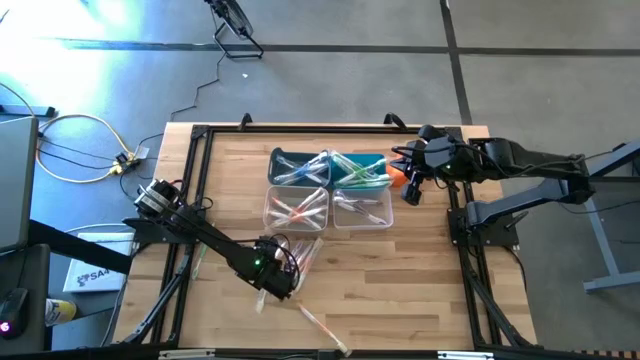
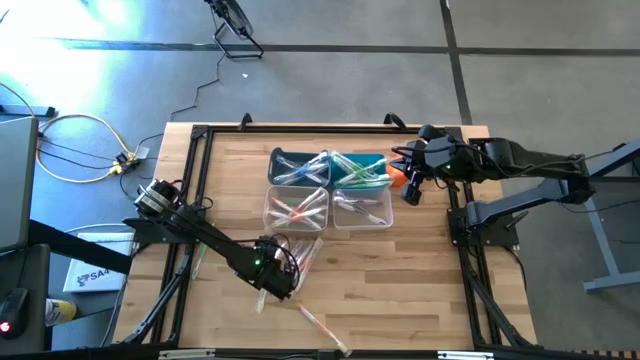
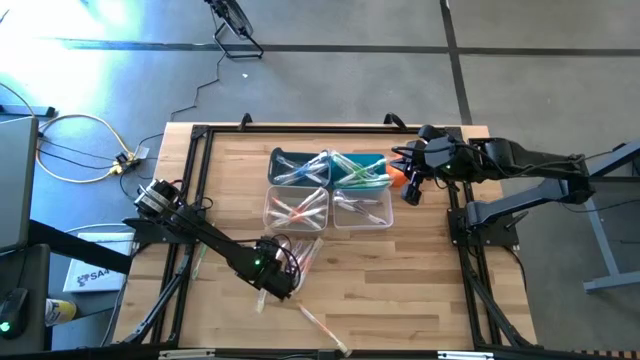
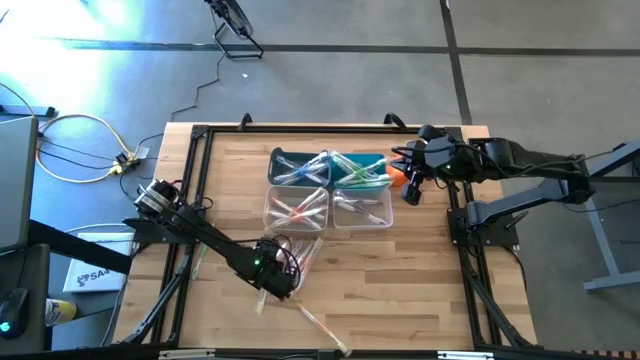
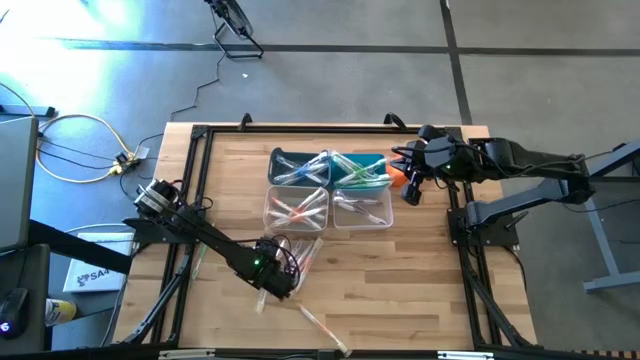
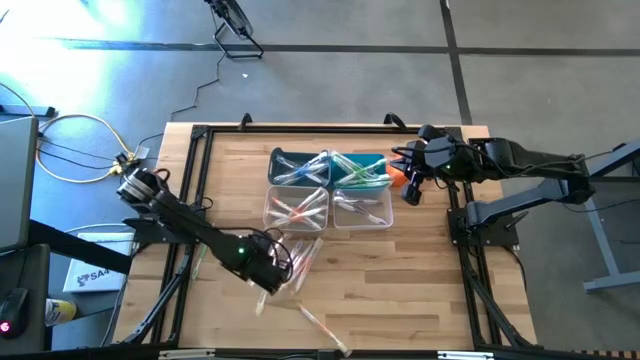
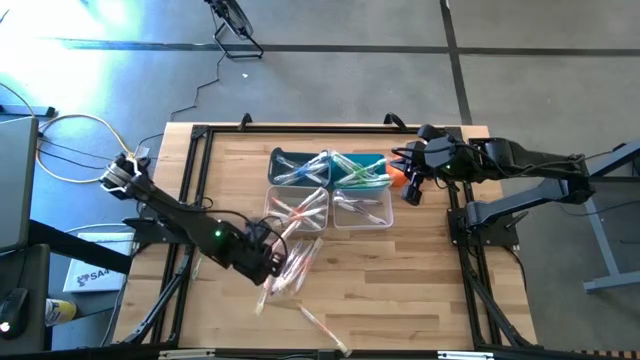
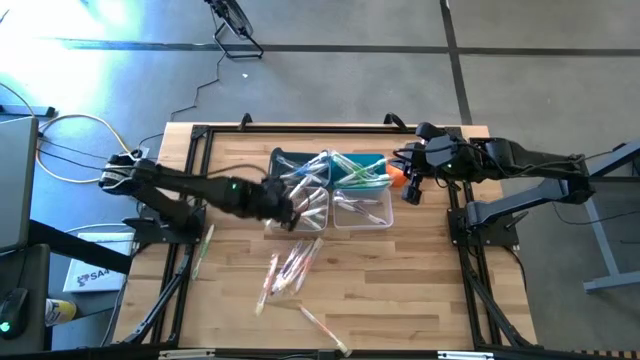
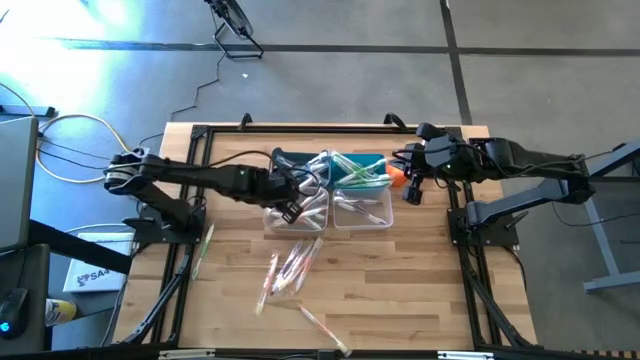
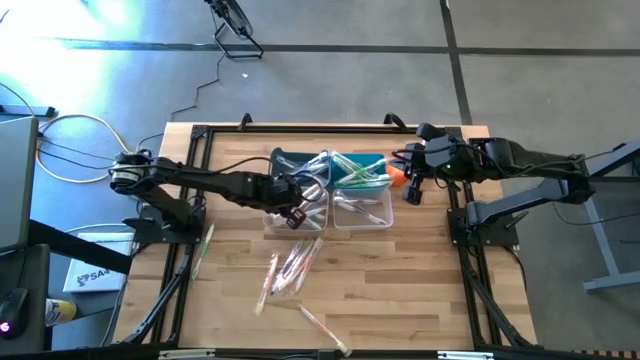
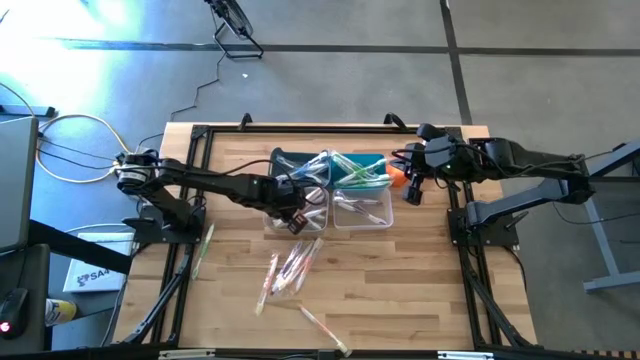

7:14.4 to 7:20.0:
Task: Pick & Place Toothbrushes
Put the orange toothbrush into the gray bin

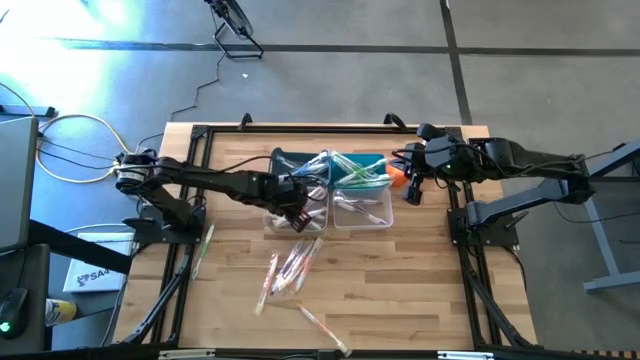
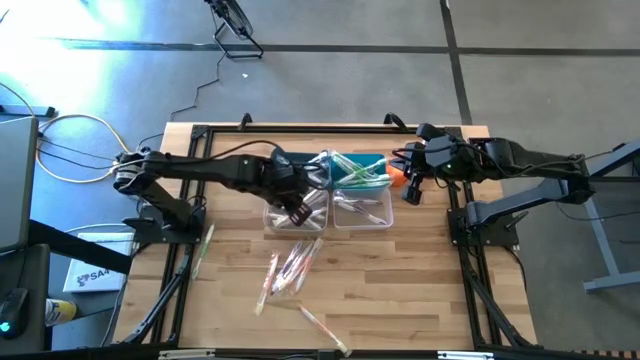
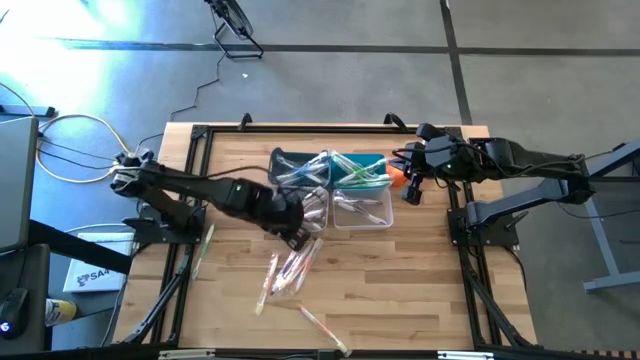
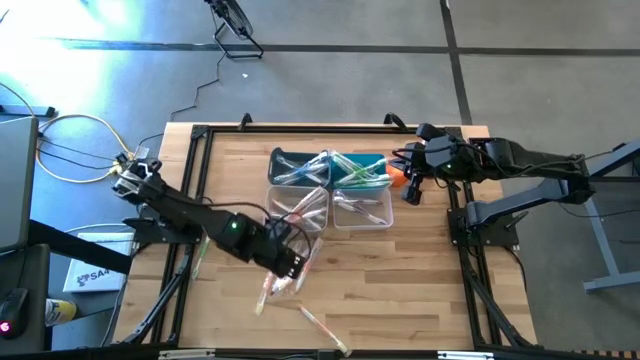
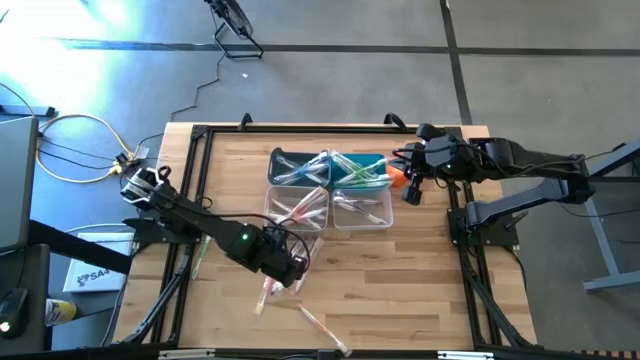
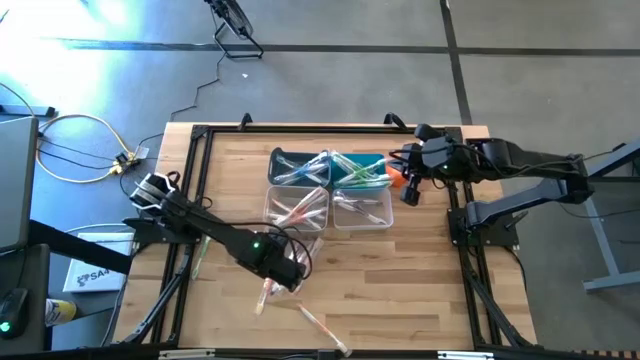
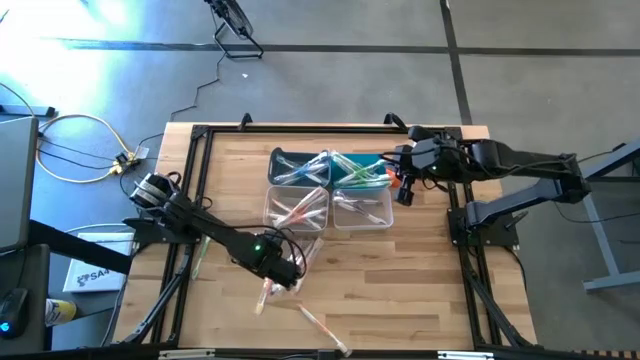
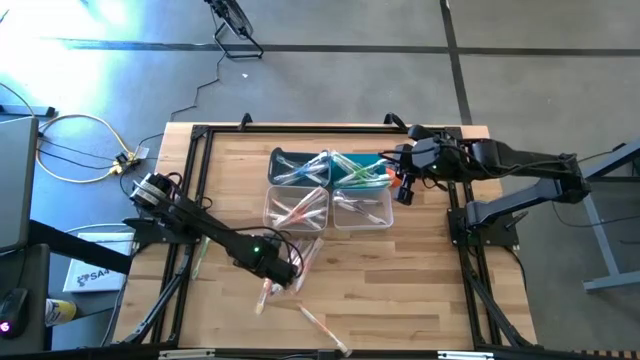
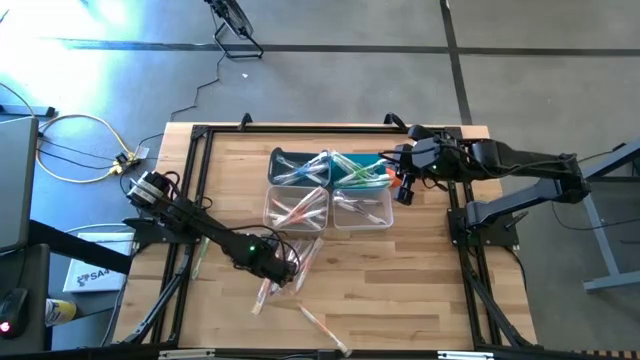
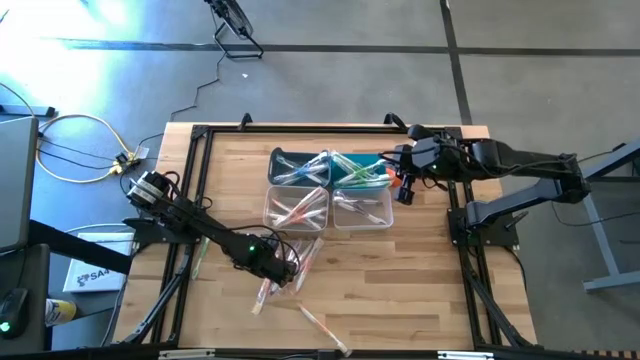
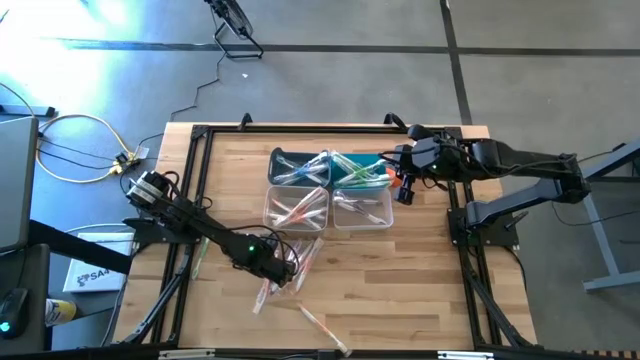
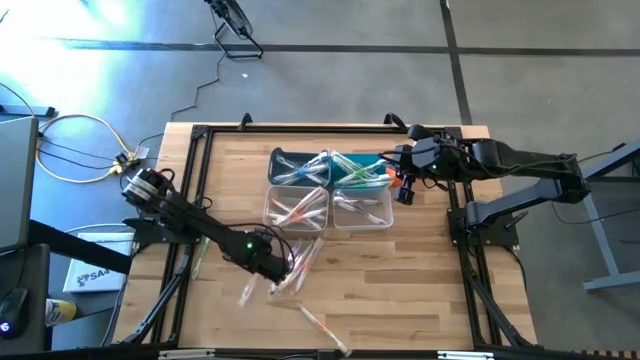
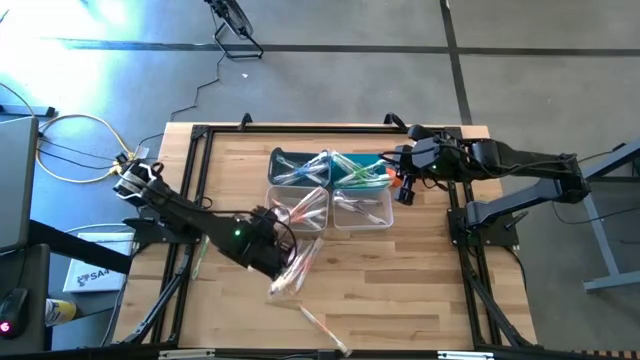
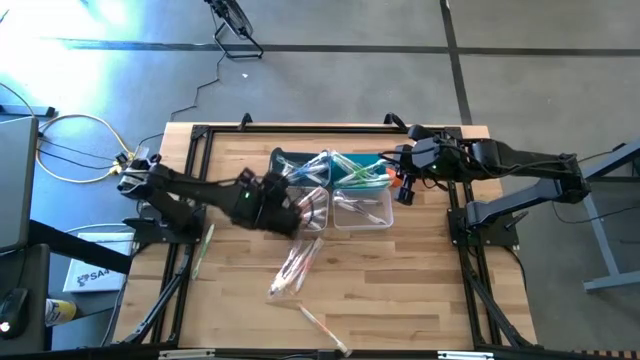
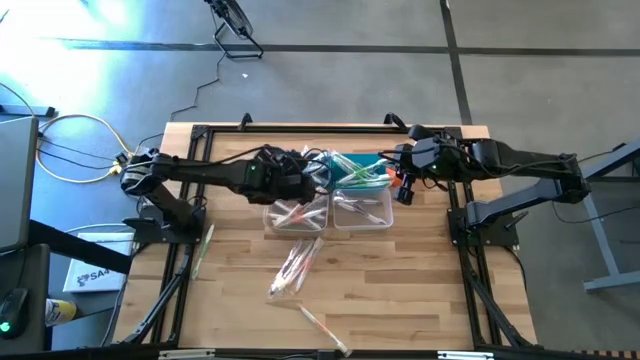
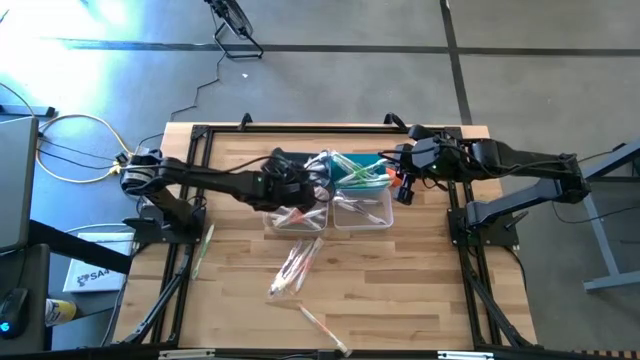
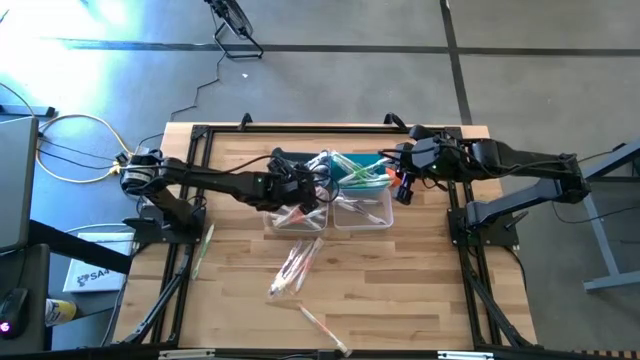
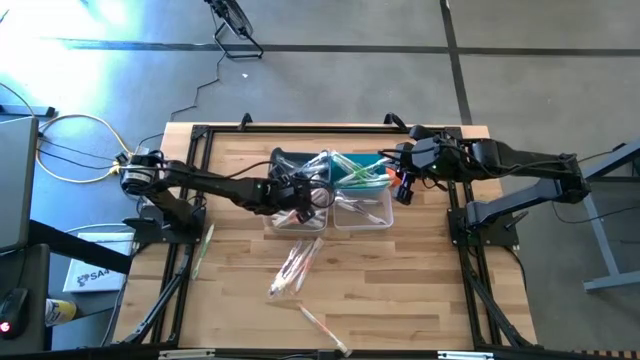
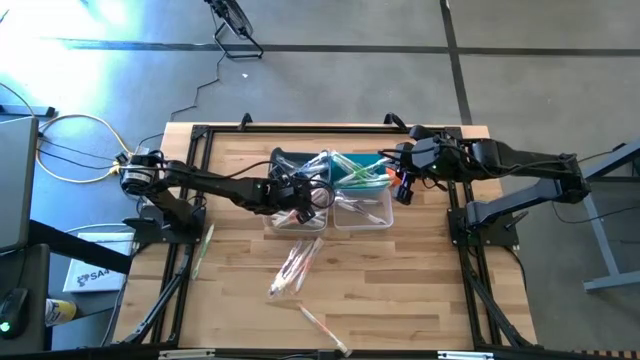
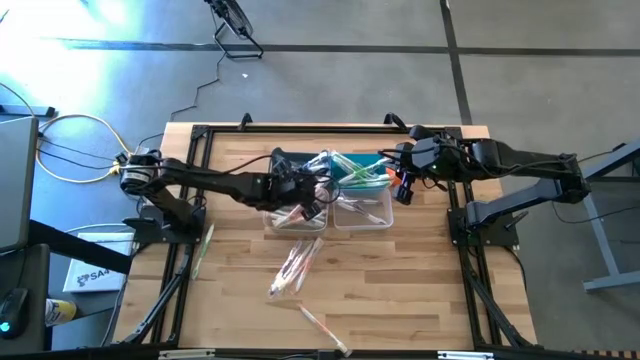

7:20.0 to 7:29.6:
Put the orange toothbrush into the gray bin

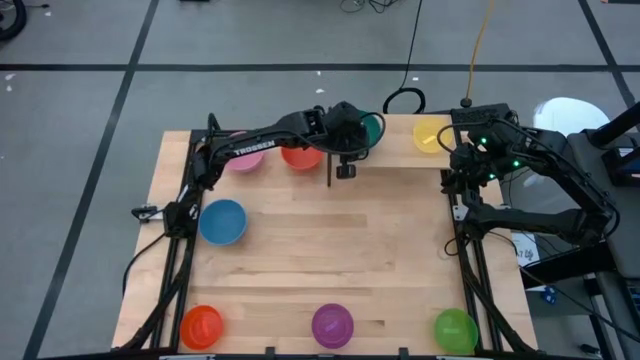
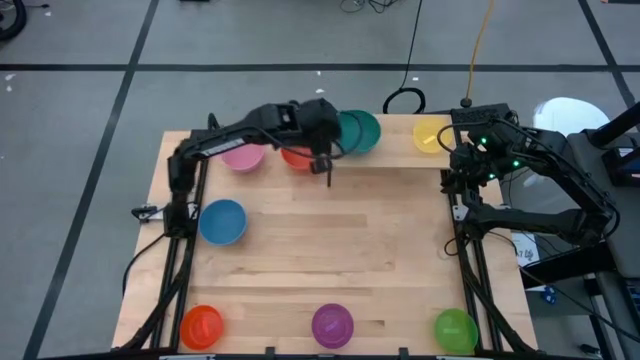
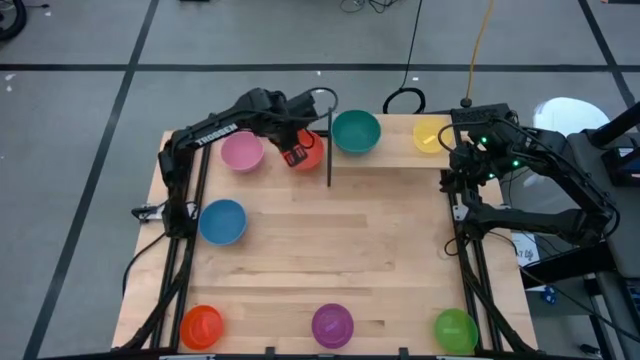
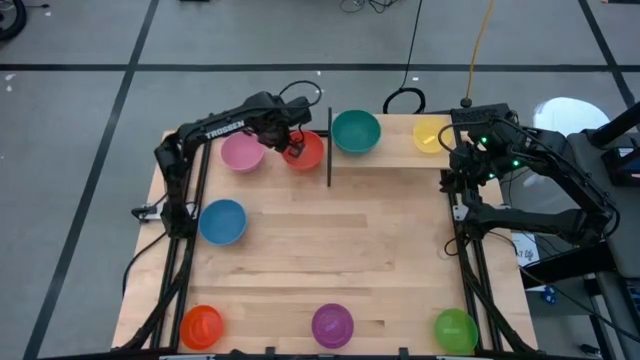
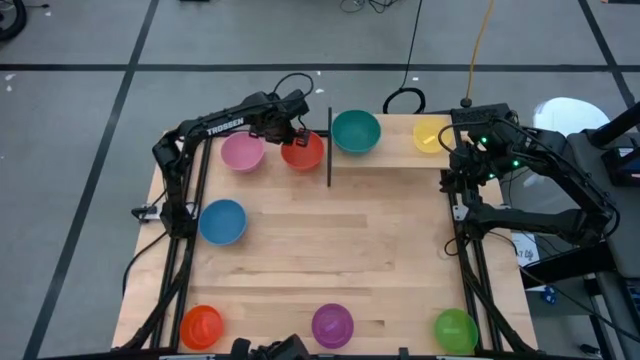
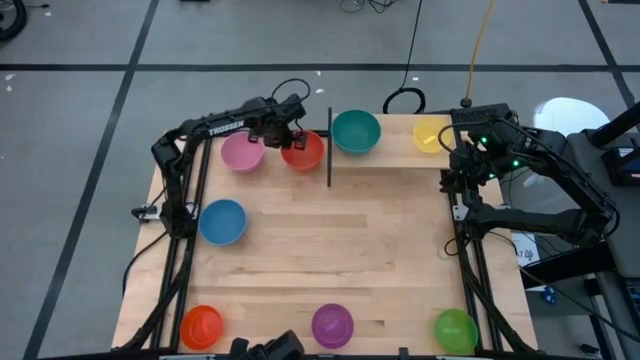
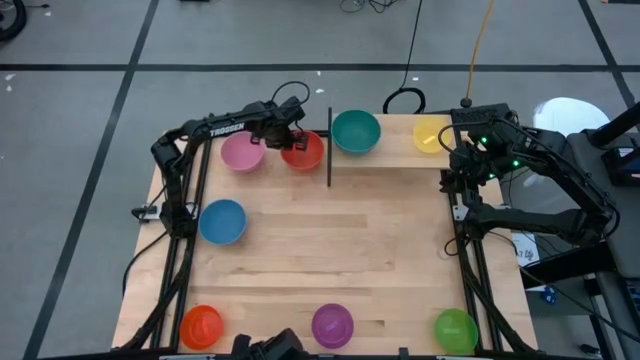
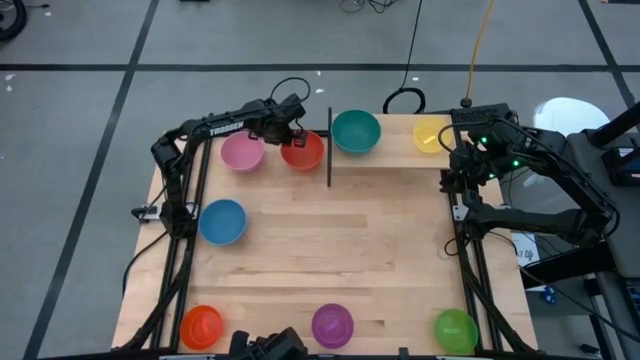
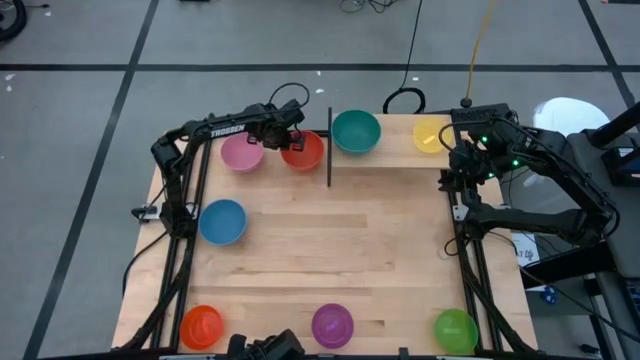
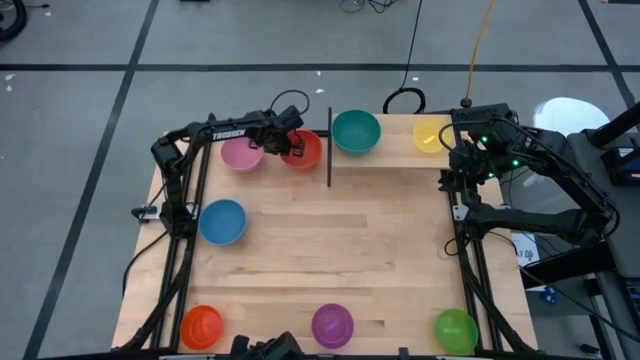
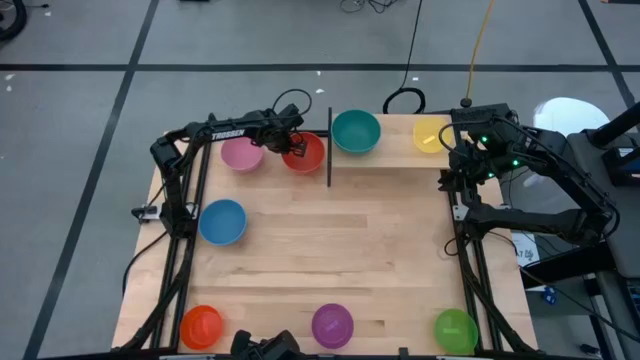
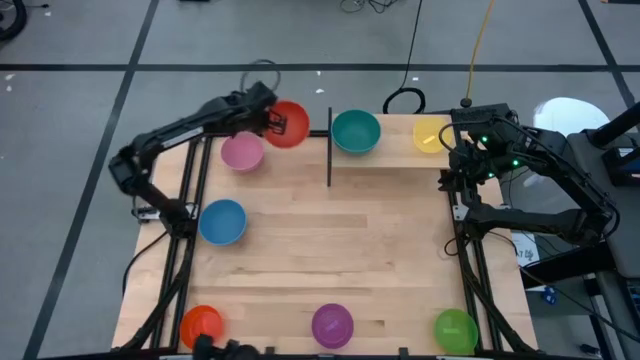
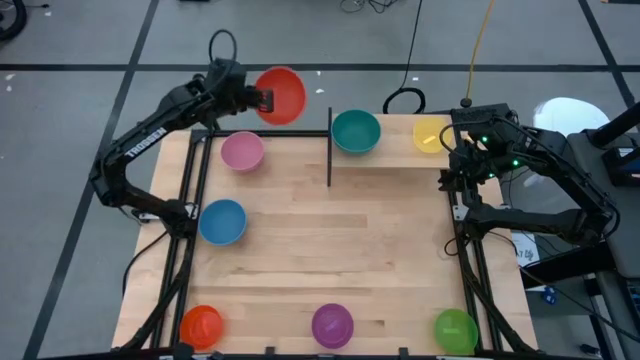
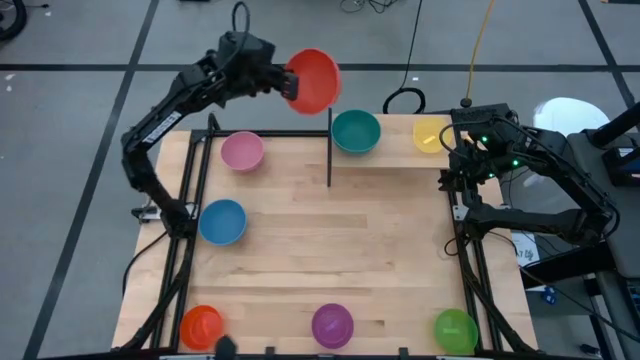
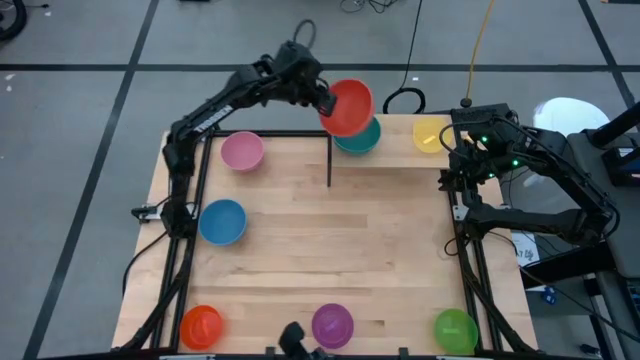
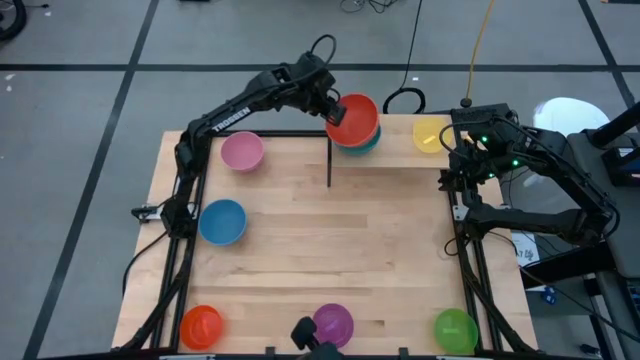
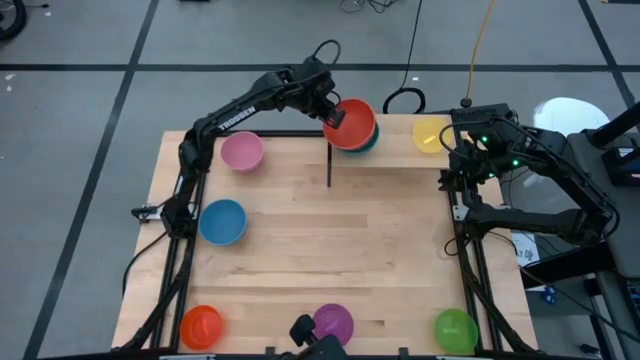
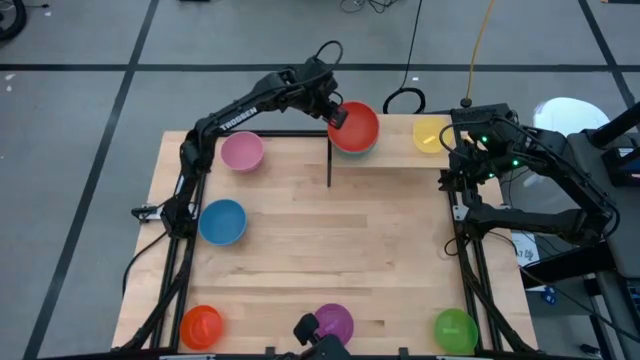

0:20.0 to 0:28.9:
Task: Place and stack bowls onto a shelf
Stack the orange bowl on top of the dark green bowl on the shelf
